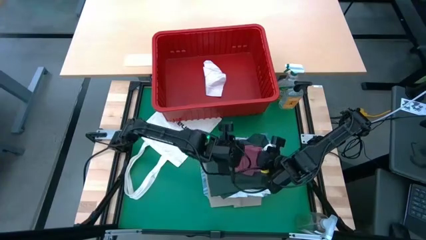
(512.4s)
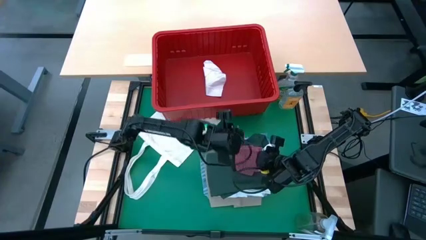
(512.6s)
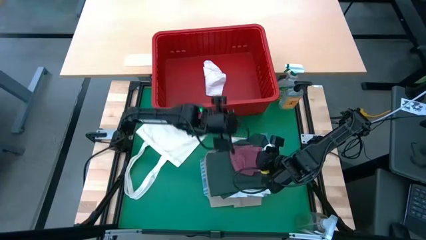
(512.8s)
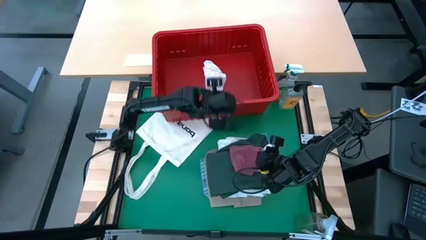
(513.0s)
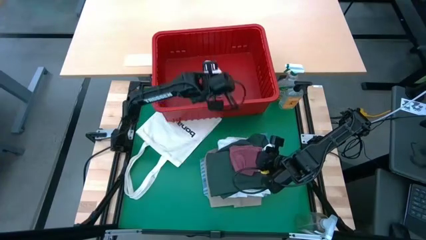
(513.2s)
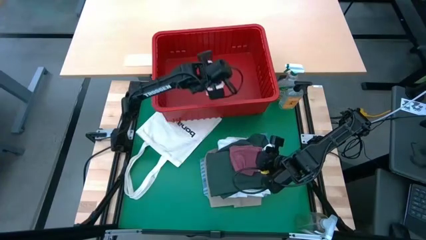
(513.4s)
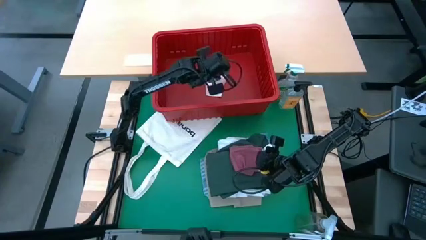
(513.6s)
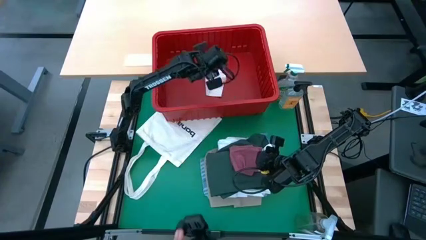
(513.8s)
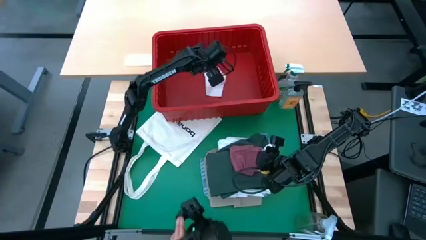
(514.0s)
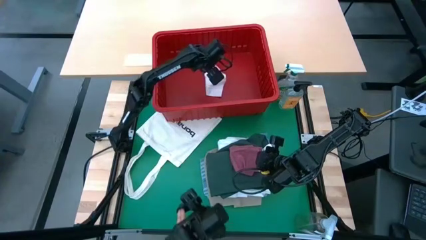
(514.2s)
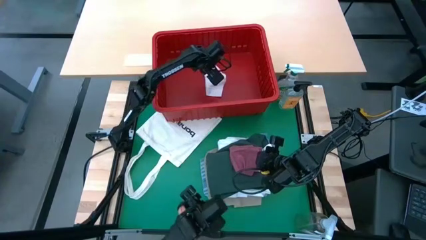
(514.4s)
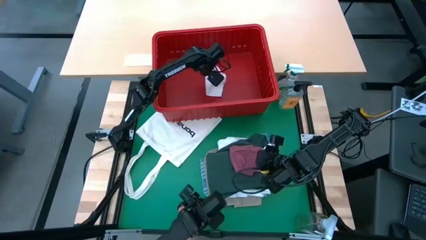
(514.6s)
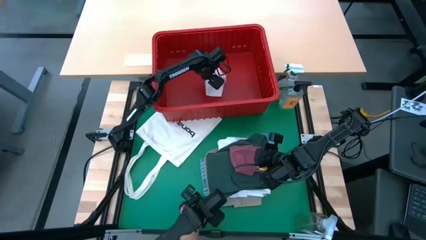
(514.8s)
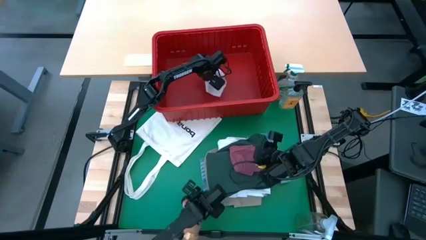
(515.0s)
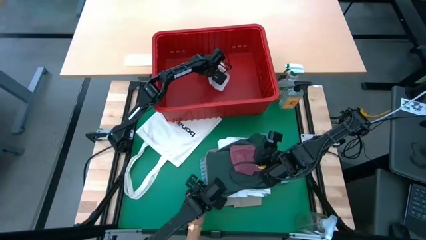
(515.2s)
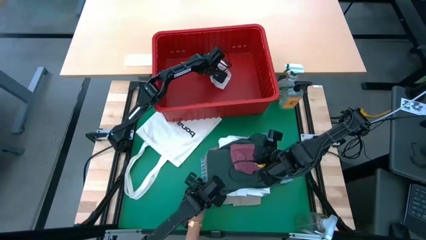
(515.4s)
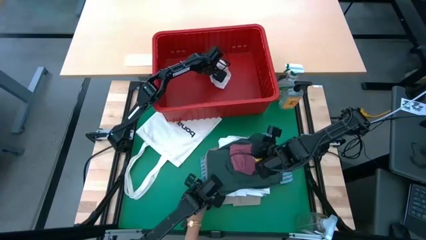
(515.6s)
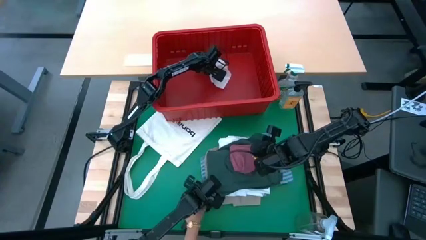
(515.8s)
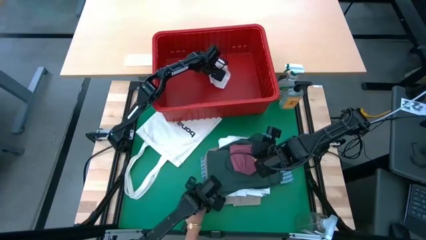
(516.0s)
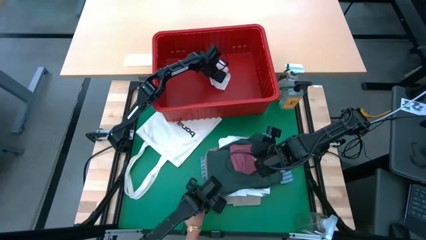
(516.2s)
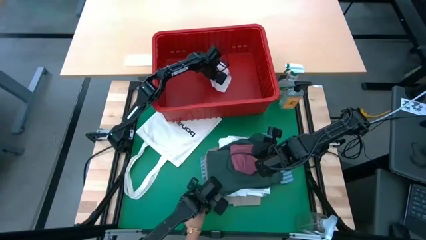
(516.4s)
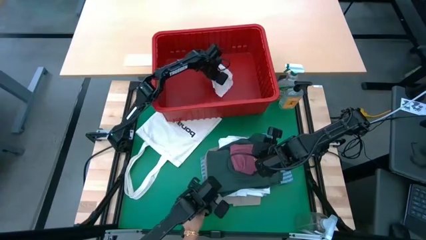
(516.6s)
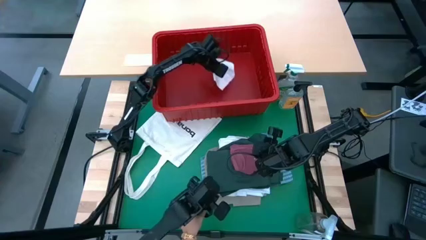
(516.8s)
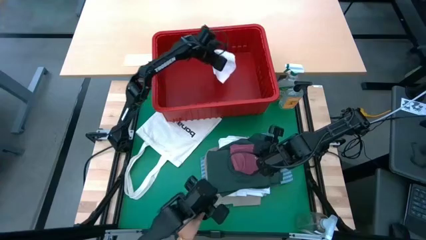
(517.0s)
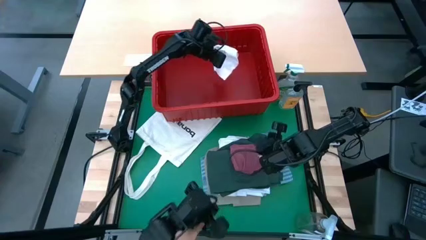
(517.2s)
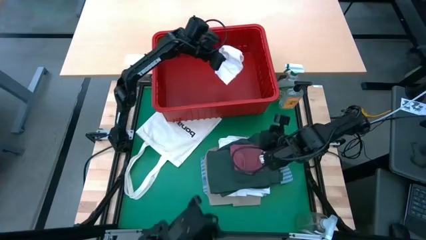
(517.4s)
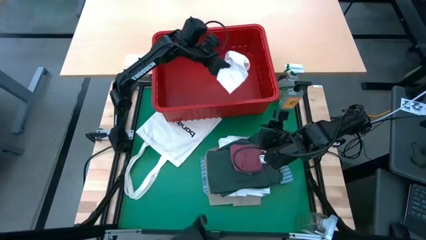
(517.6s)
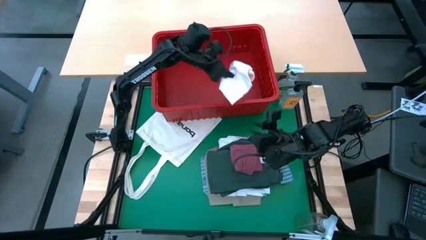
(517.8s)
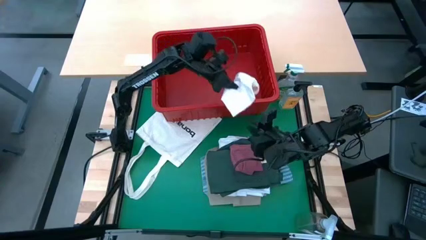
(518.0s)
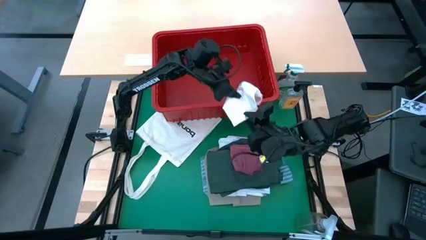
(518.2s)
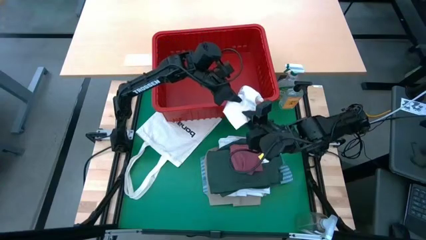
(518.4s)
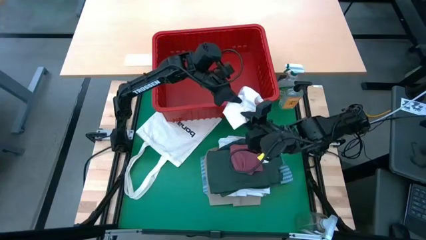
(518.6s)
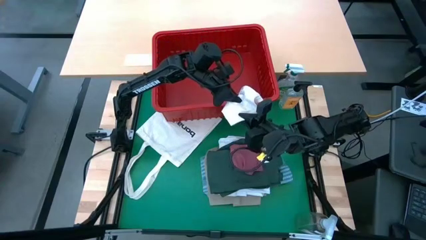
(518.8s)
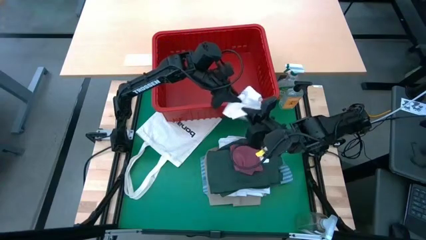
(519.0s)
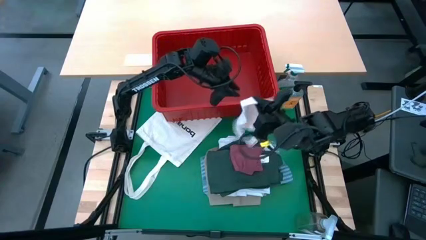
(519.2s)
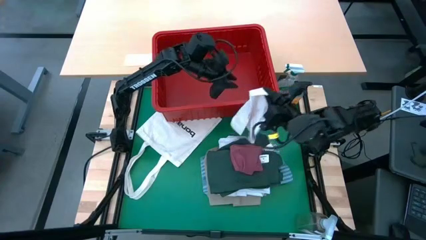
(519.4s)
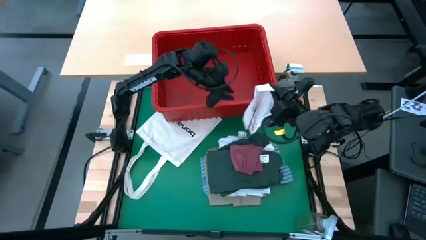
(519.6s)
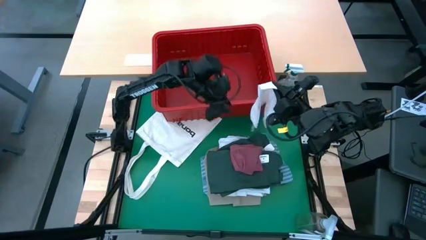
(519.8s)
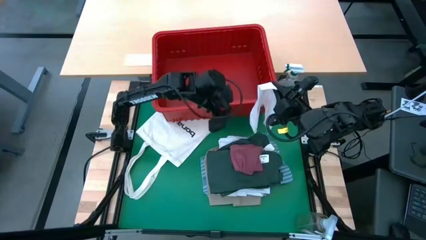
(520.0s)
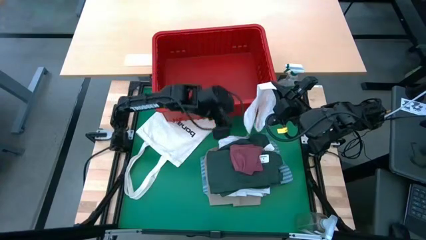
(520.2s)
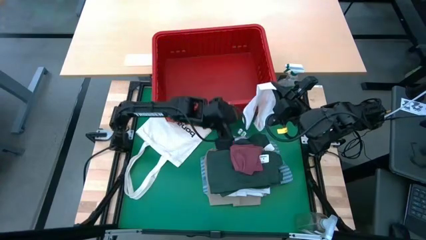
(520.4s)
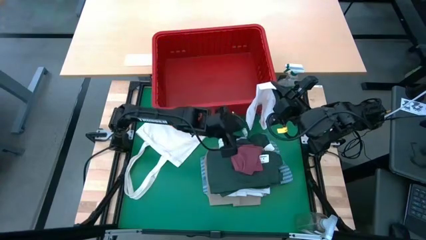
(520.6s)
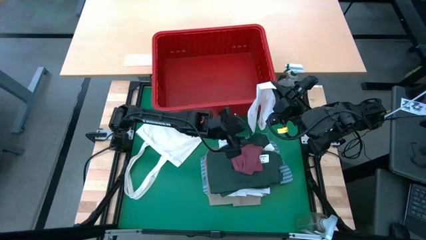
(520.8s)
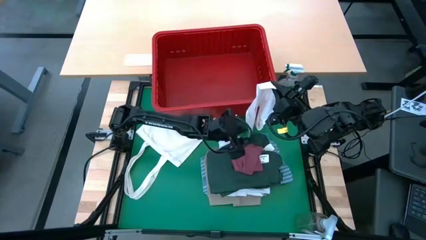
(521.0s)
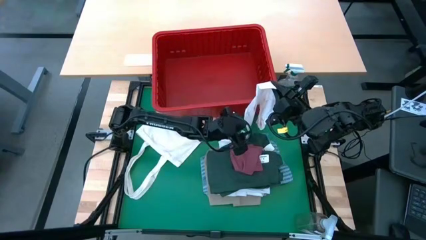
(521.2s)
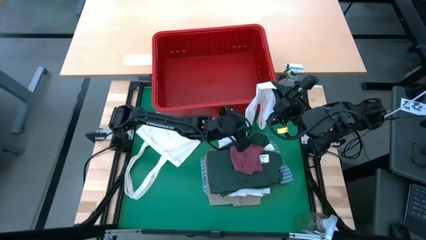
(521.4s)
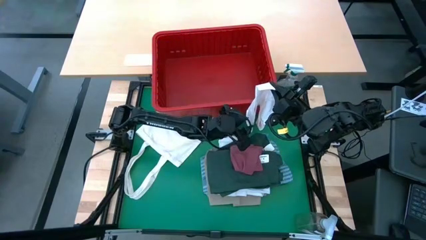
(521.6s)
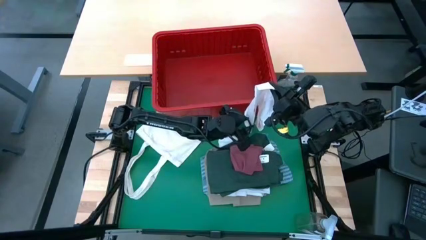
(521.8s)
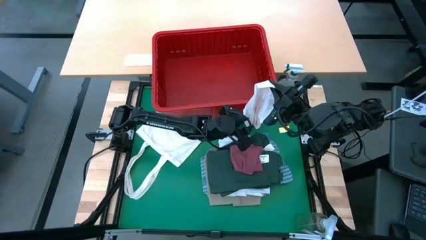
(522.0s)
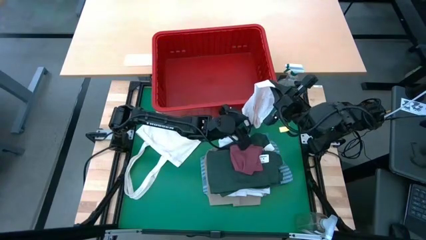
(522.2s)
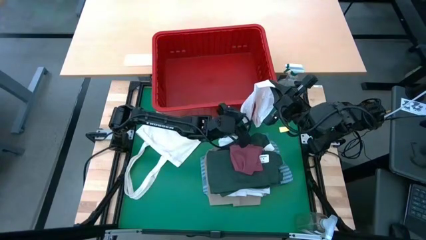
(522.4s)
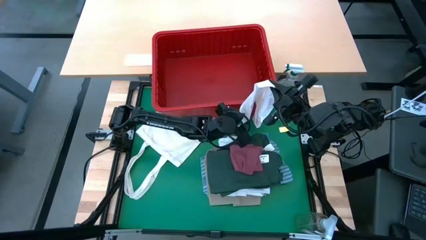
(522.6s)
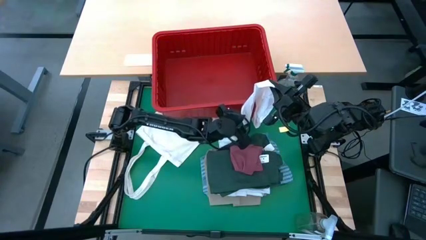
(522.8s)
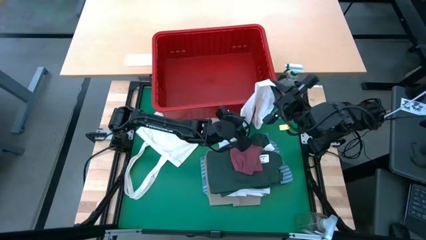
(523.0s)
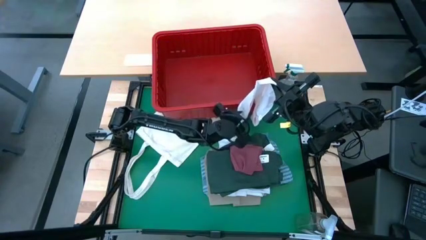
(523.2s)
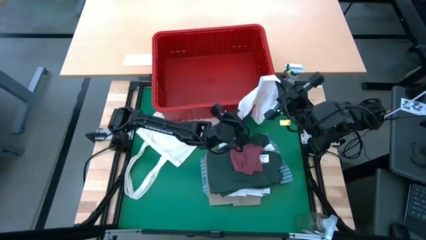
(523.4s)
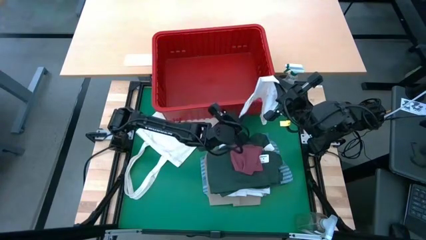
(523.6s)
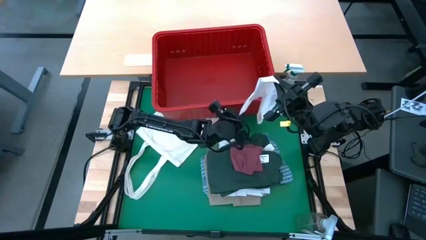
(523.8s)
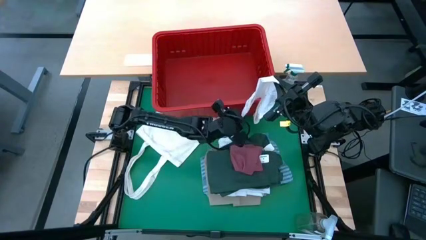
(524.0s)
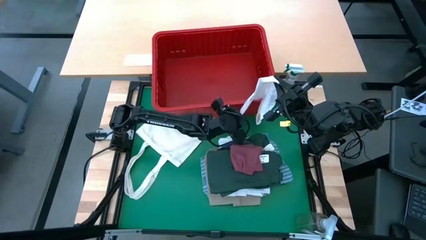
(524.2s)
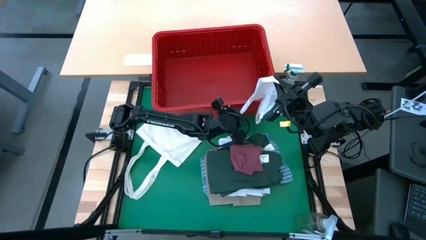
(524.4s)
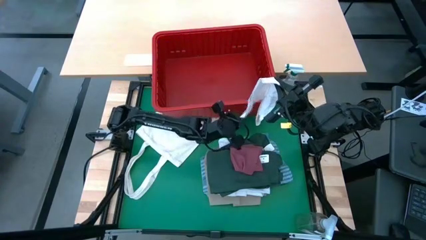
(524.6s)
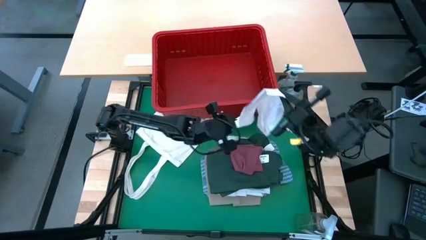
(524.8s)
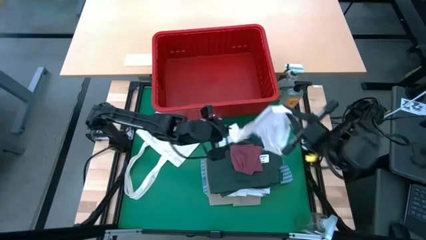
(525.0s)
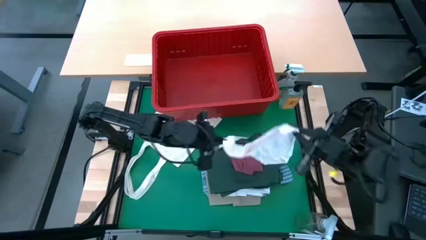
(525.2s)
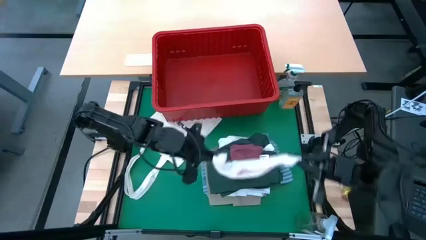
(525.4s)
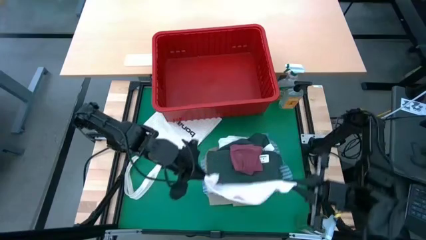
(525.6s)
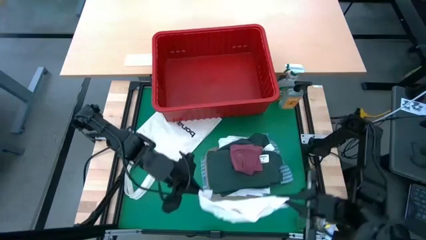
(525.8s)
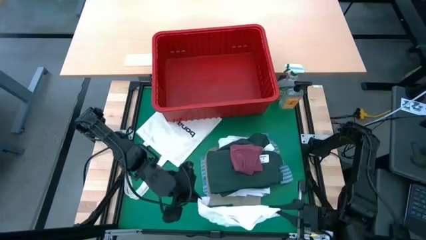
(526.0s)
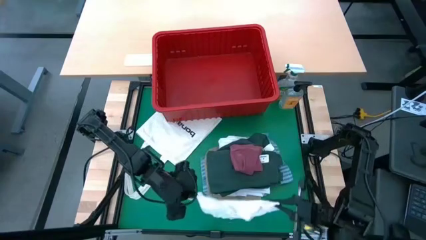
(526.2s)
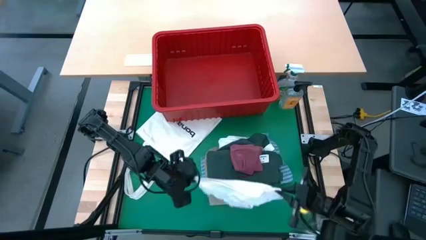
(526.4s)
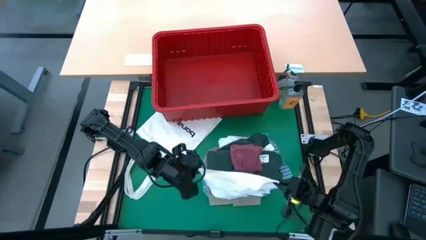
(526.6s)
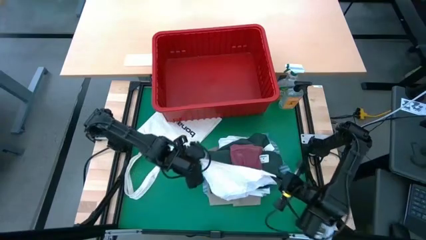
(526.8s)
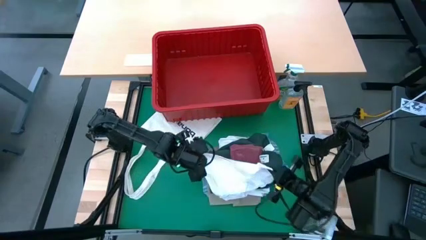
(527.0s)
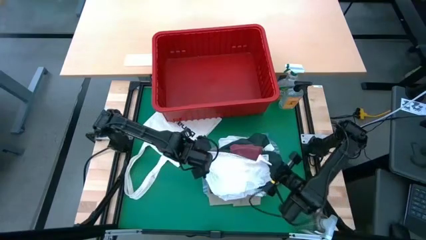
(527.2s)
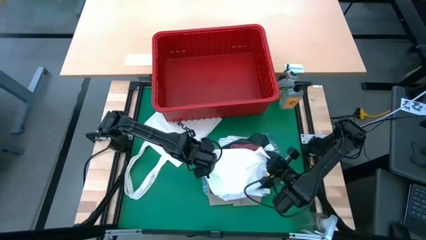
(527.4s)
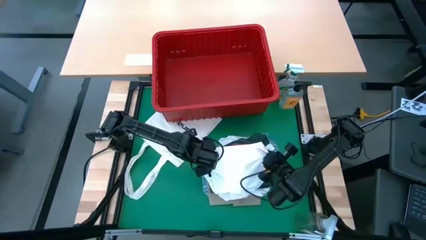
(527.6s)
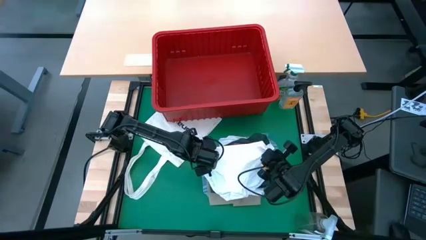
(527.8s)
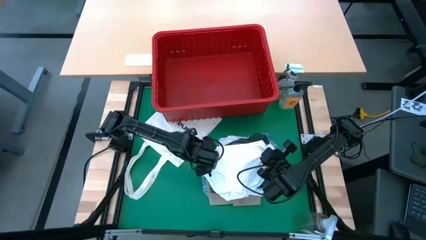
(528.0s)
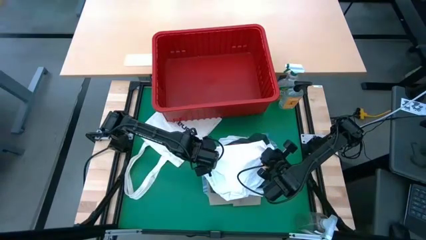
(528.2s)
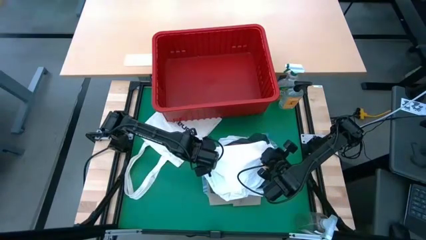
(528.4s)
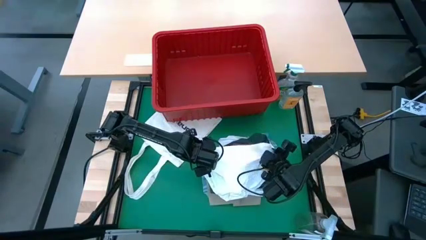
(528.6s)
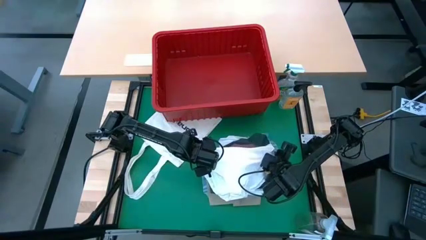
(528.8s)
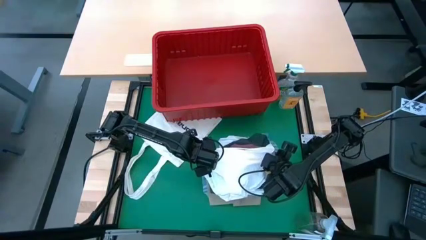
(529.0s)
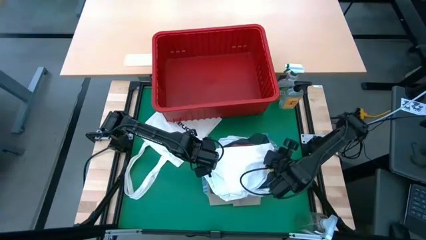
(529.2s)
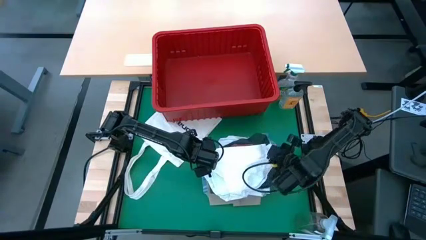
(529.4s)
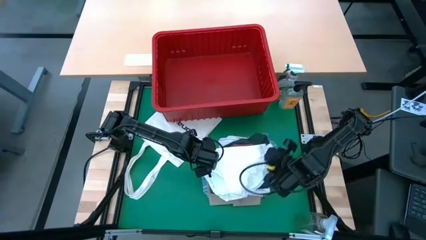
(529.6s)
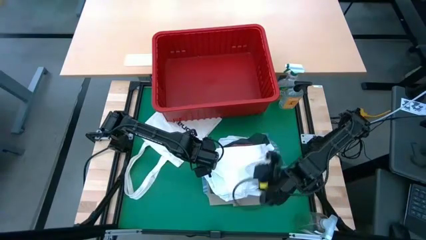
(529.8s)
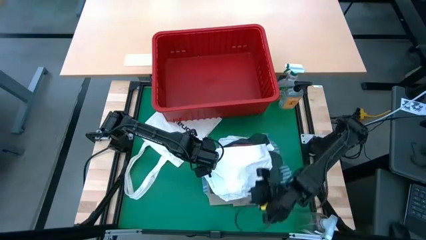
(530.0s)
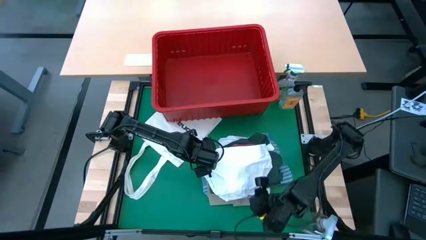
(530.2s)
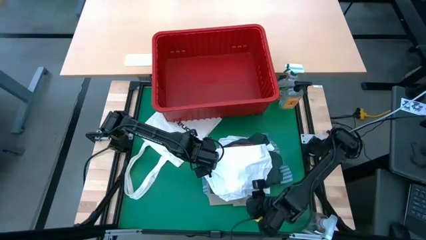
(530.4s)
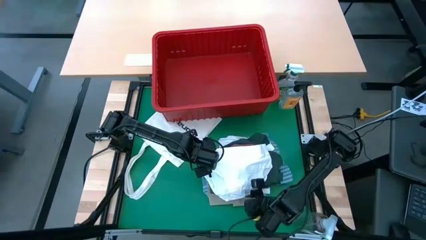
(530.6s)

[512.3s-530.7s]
Task: Fold Laundry from Bin
Remove the white underwear from the red bin
